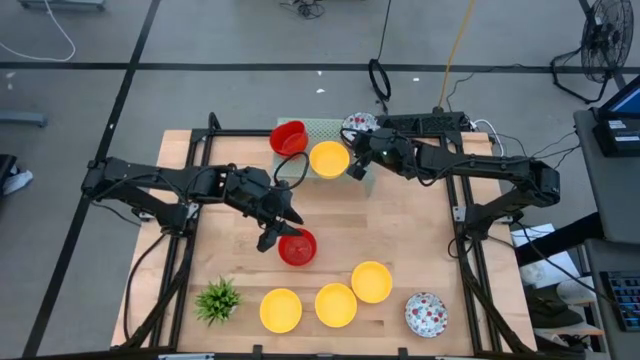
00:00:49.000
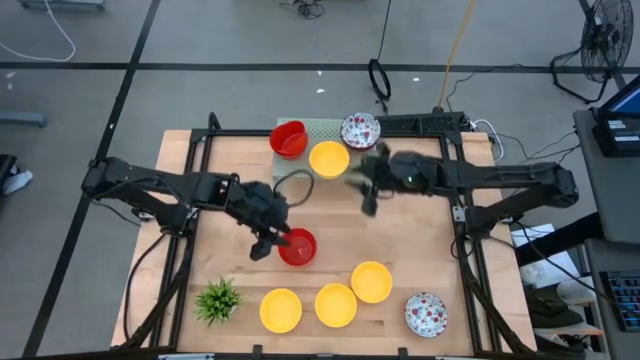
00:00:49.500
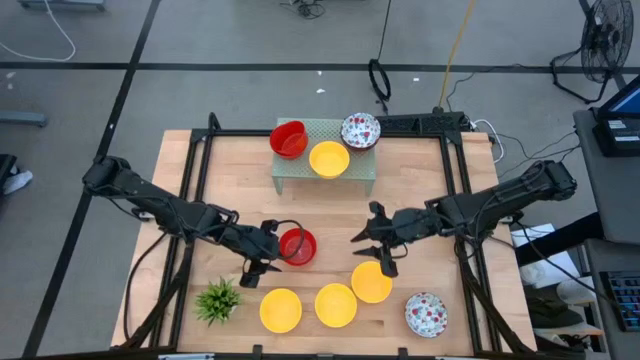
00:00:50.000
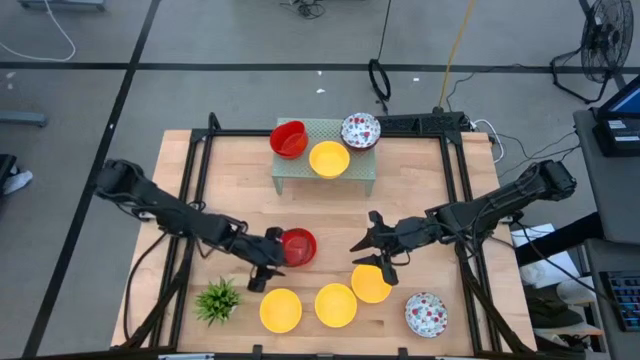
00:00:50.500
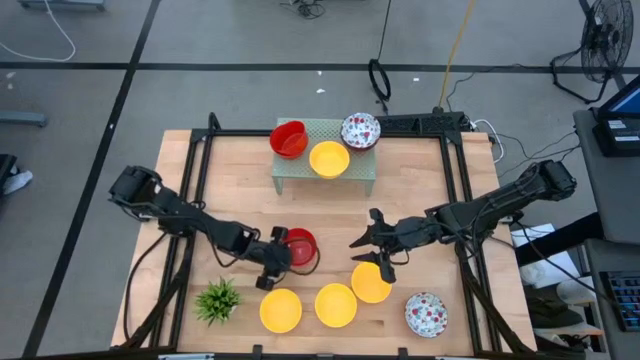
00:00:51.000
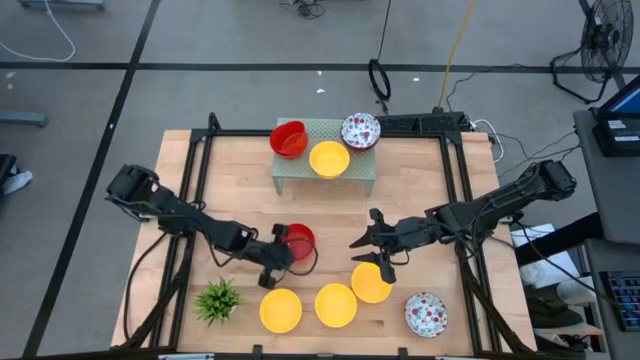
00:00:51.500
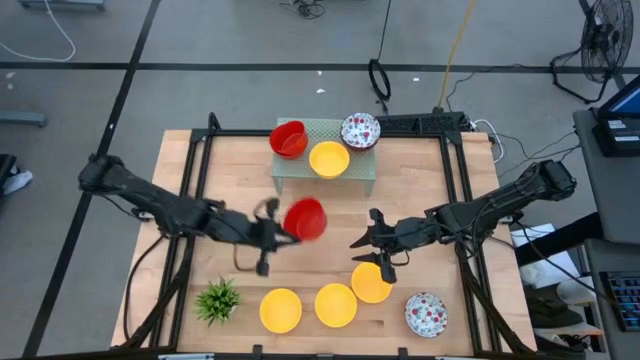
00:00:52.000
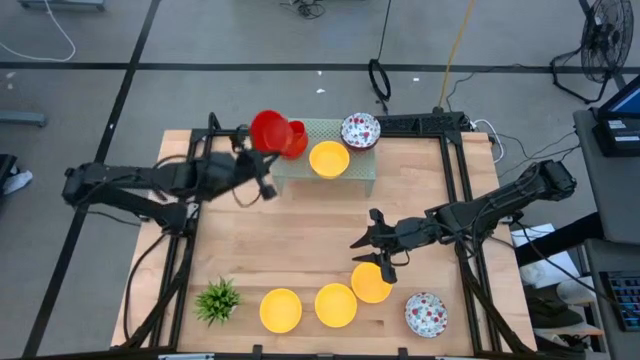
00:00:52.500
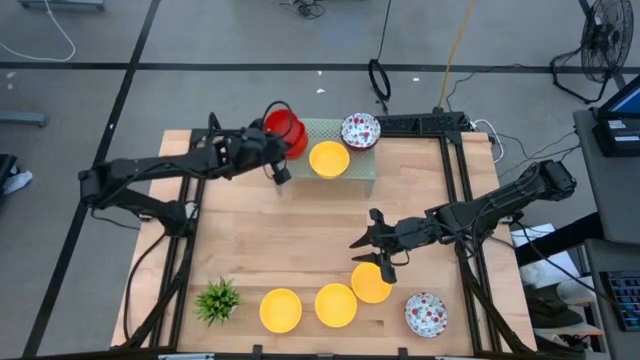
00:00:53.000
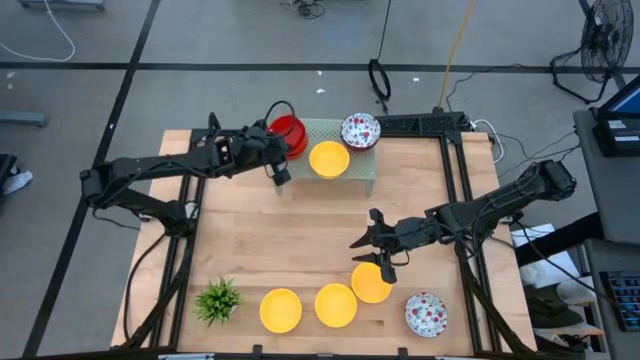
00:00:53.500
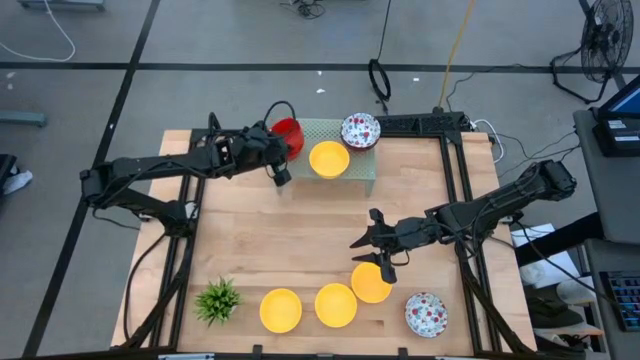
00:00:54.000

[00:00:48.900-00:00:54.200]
Task: Pick & Place Mini bowls
Stack the red bowl on top of the red bowls on the shelf

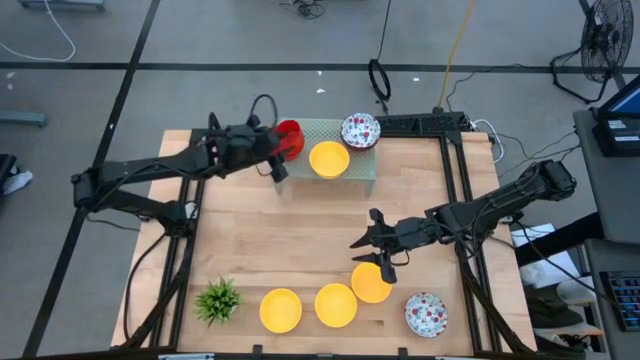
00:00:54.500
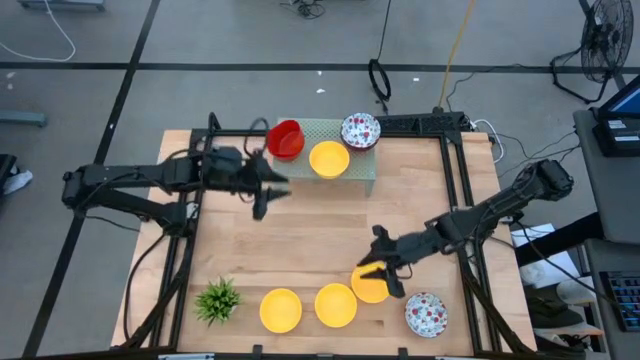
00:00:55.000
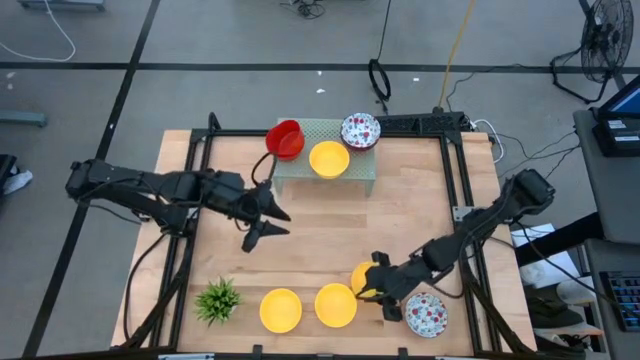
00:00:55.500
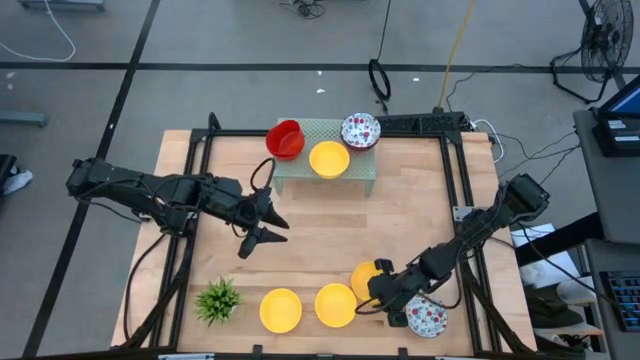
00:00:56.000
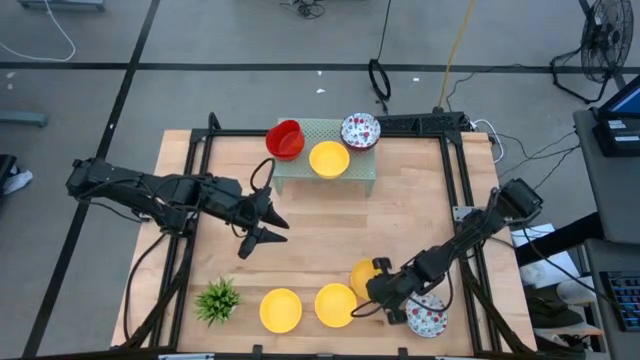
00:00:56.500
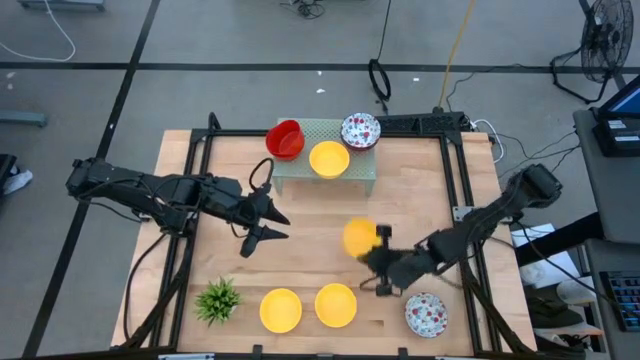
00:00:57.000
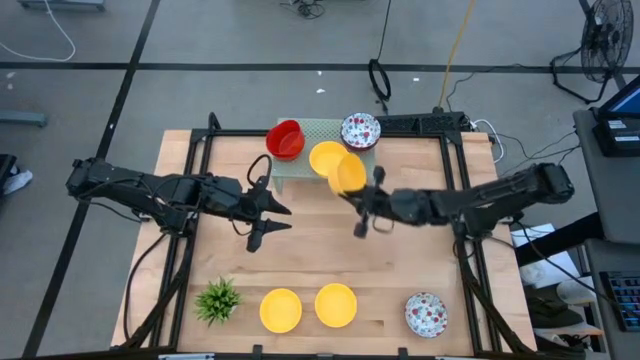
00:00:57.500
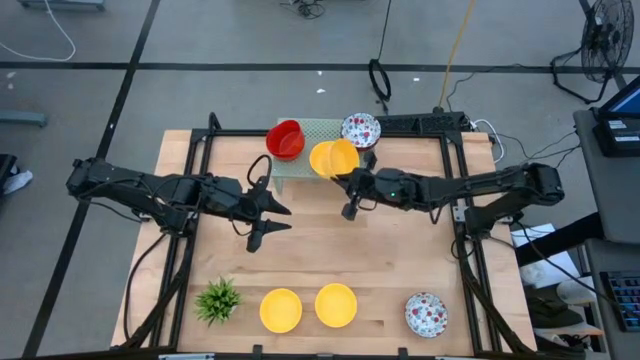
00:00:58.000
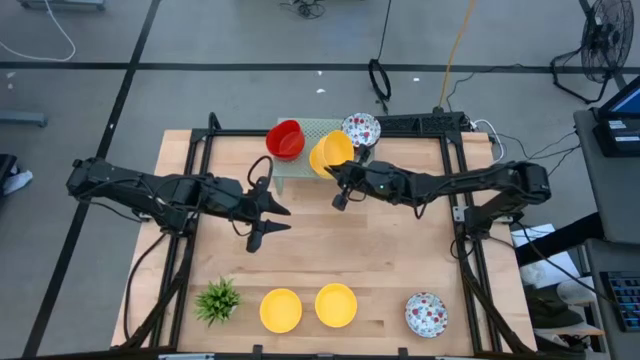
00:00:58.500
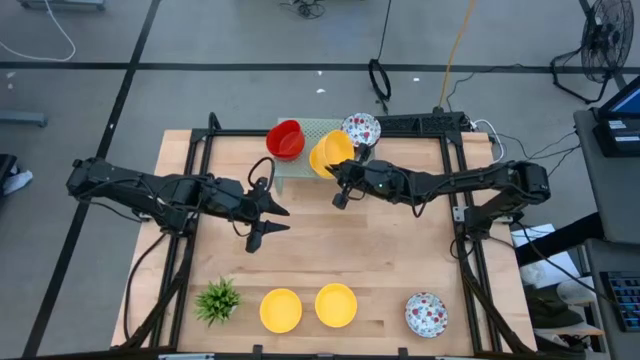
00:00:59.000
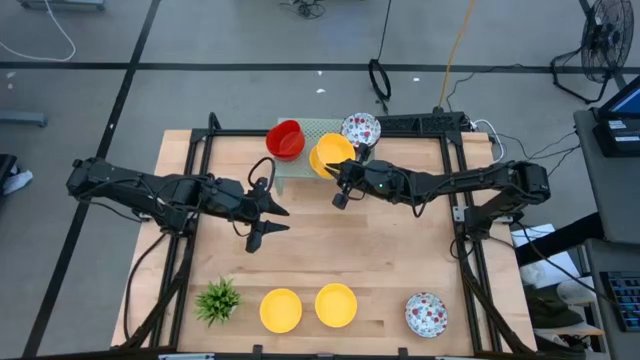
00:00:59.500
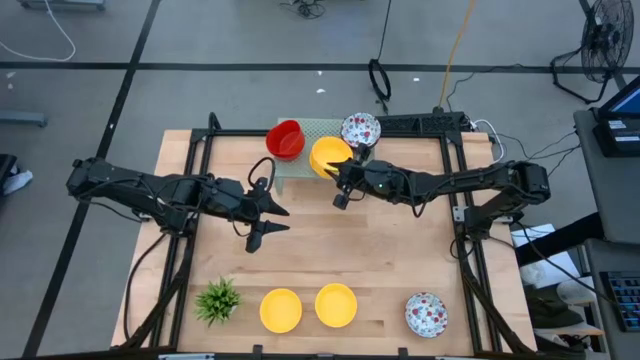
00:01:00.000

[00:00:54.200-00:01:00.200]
Stack the yellow bowl on top of the yellow bowl on the shelf

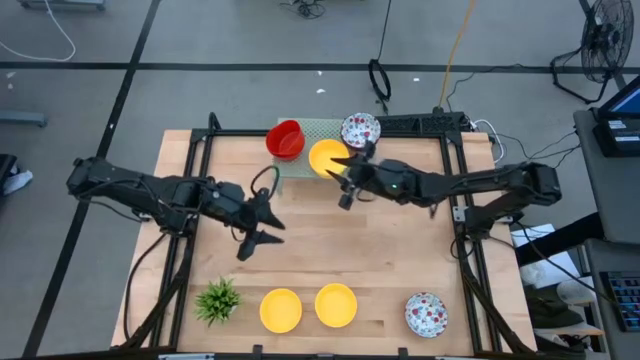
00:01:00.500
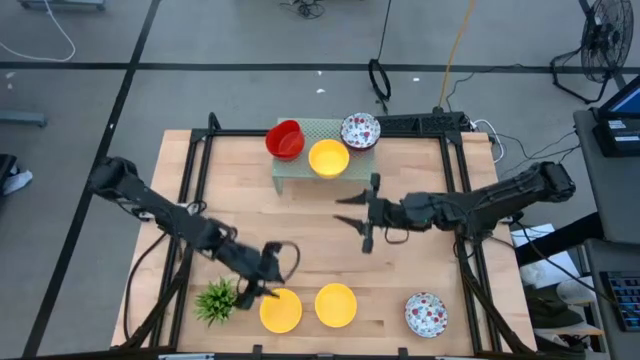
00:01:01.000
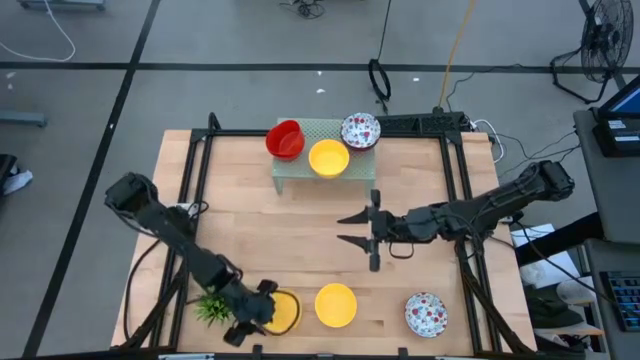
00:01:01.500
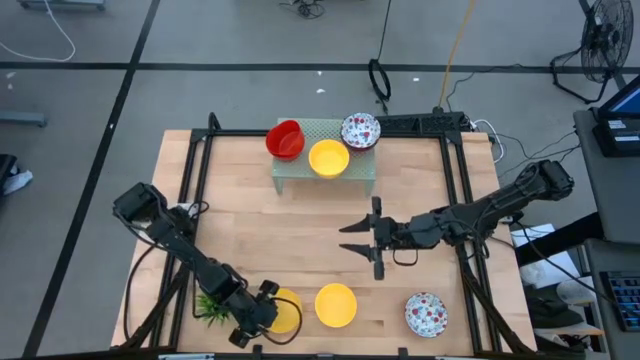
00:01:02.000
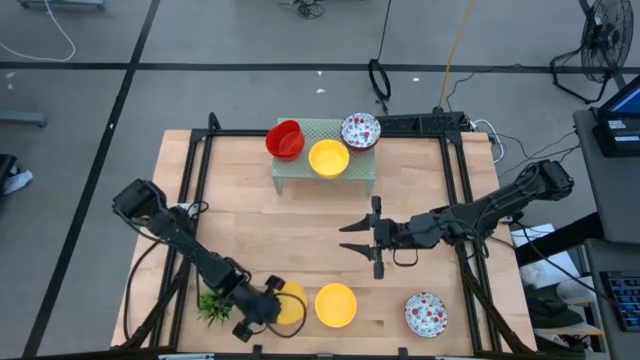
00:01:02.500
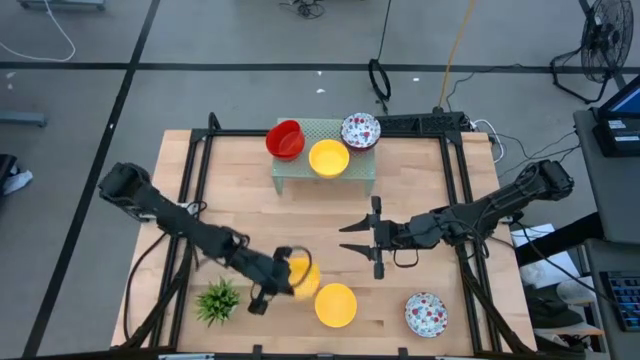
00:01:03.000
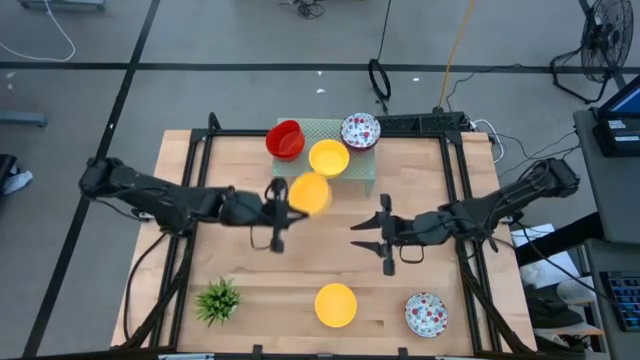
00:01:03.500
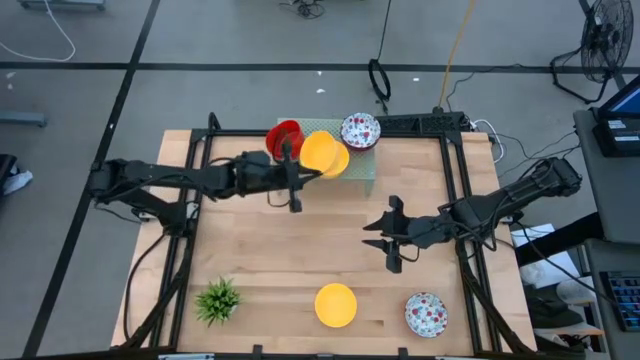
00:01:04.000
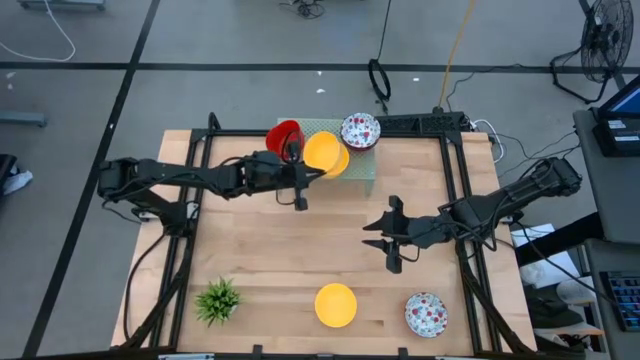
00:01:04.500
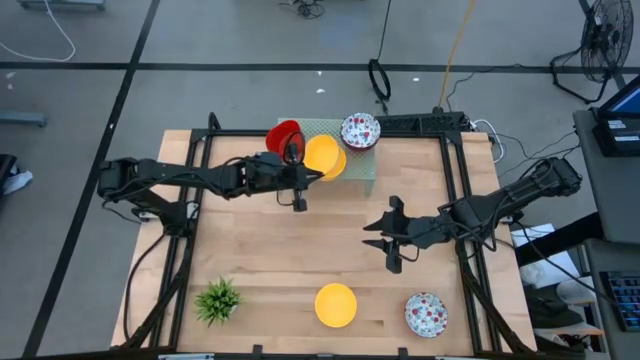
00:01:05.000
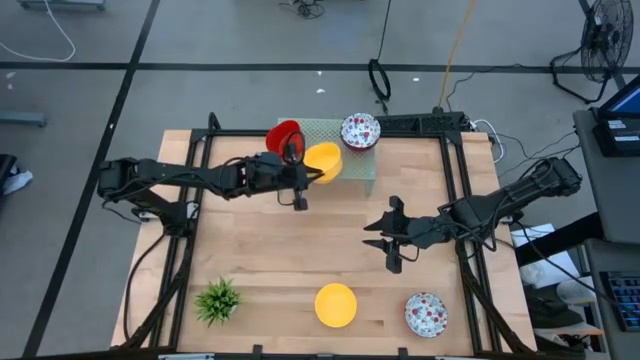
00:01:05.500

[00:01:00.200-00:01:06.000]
Stack the red bowl on top of the red bowls on the shelf

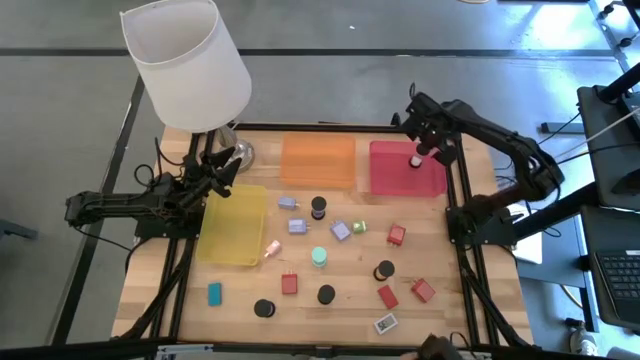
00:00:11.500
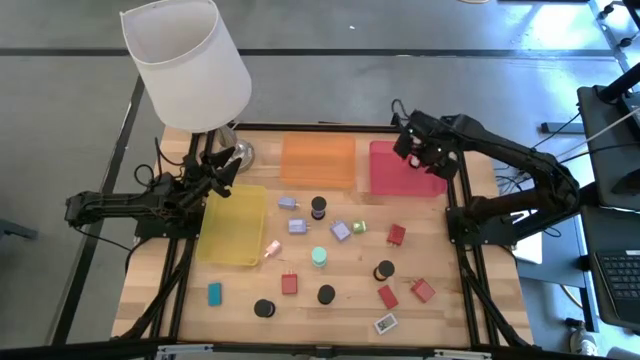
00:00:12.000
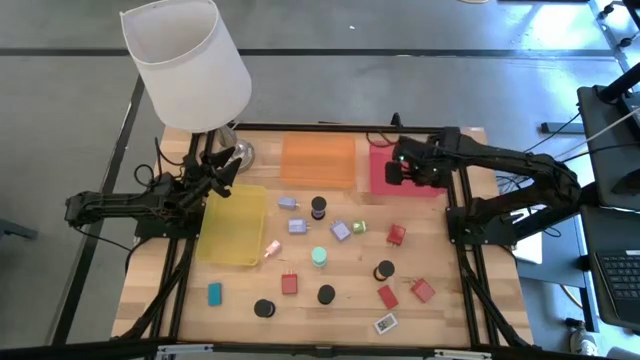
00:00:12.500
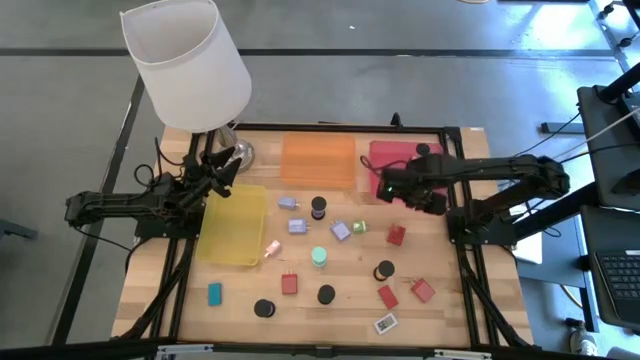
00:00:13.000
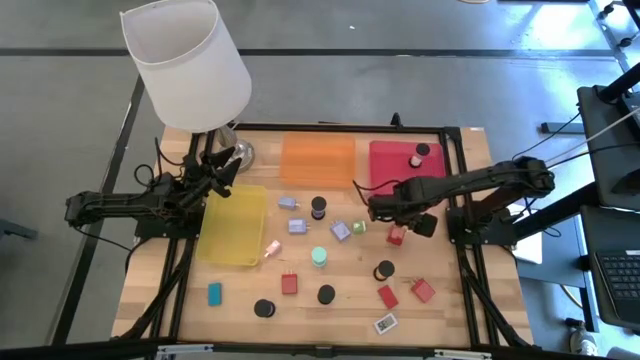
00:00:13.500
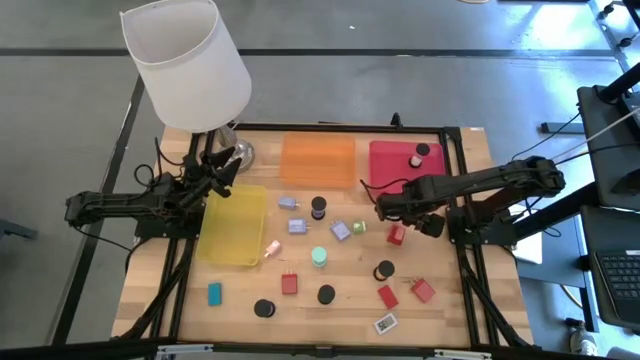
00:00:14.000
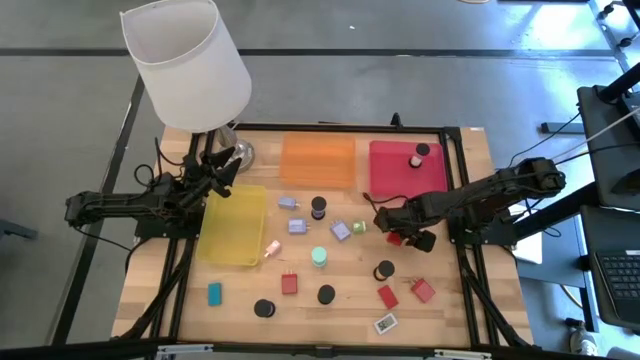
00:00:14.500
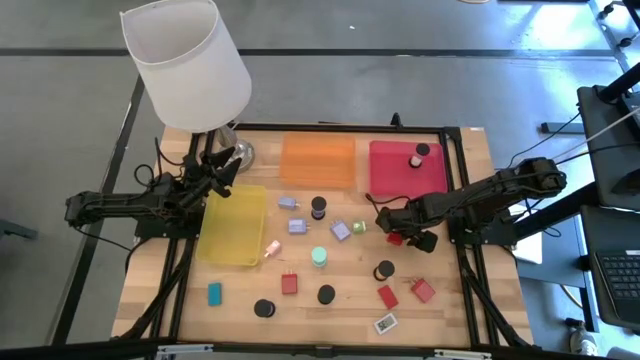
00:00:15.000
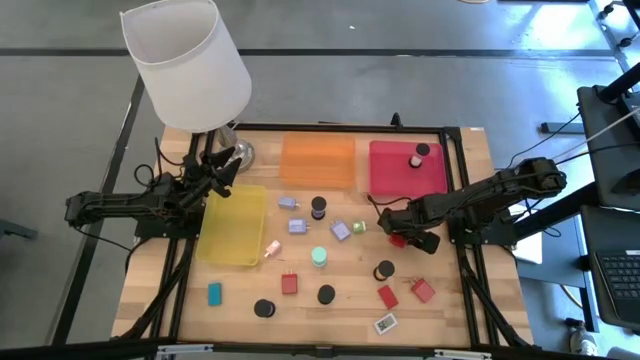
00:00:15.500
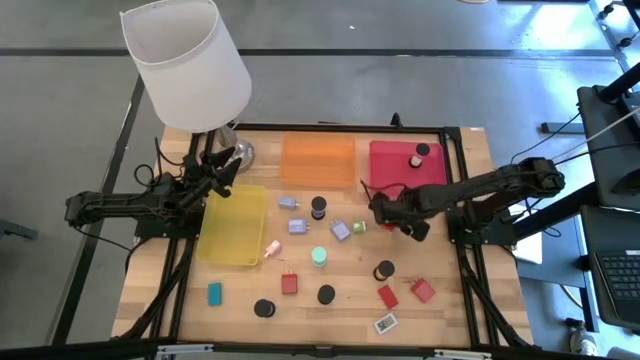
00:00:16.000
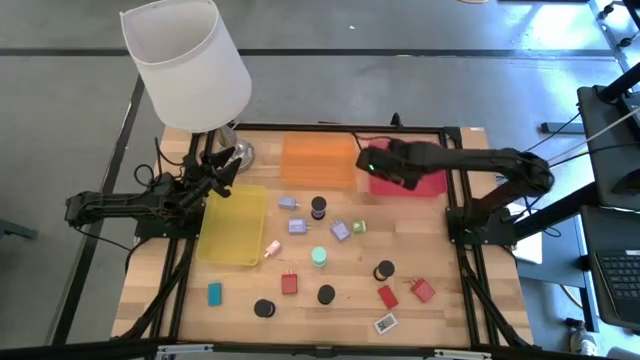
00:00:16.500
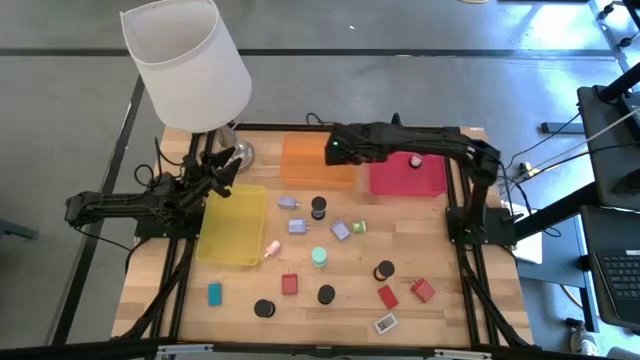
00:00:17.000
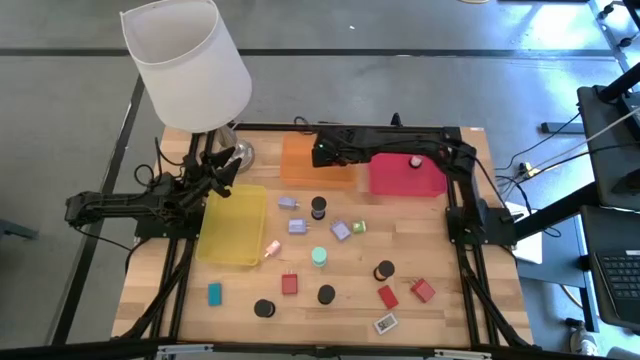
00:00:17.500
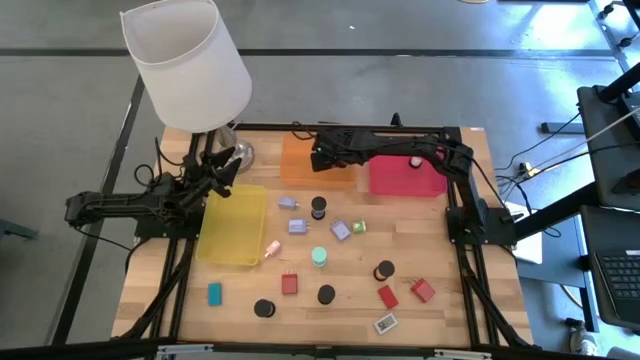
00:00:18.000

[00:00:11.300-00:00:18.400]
Task: Pick & Place Office items
Put the top red charger adapter into the orange bin
